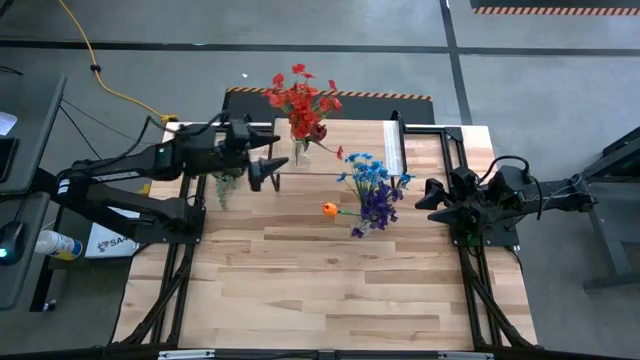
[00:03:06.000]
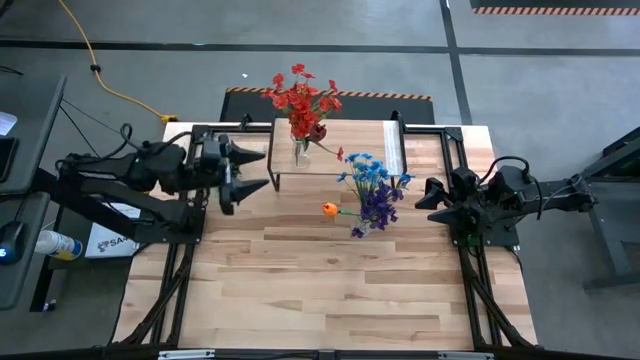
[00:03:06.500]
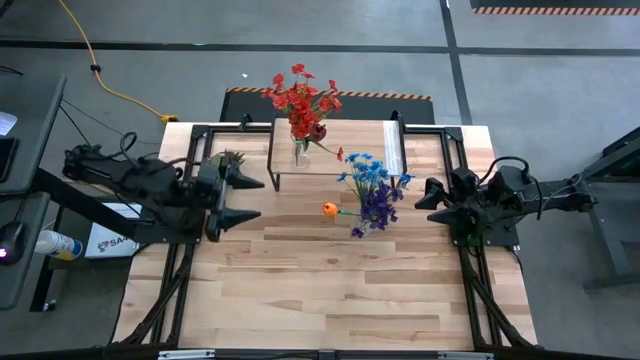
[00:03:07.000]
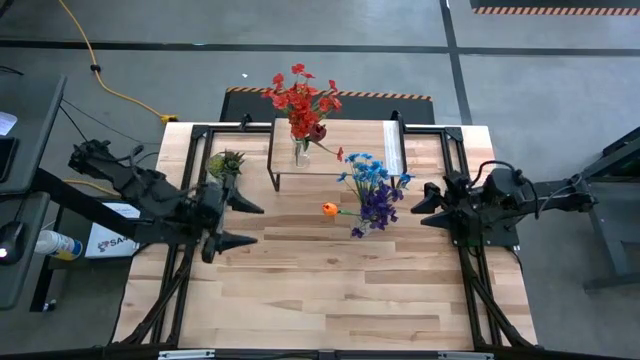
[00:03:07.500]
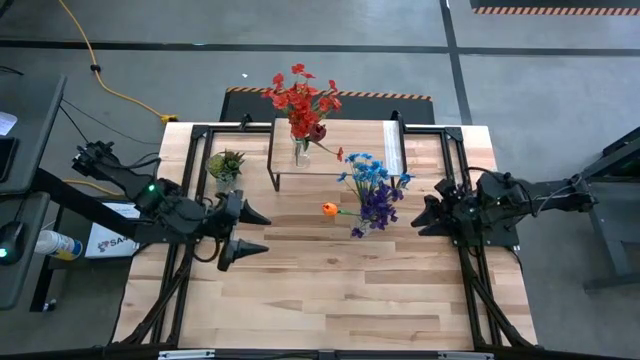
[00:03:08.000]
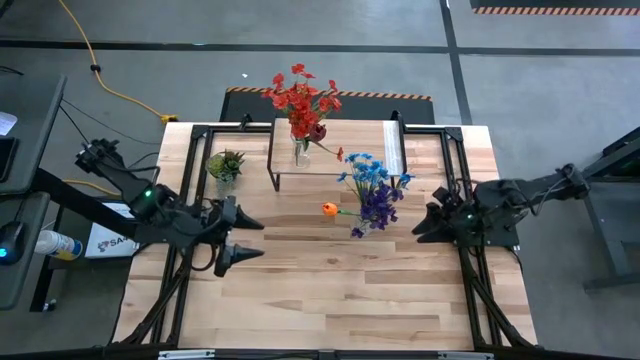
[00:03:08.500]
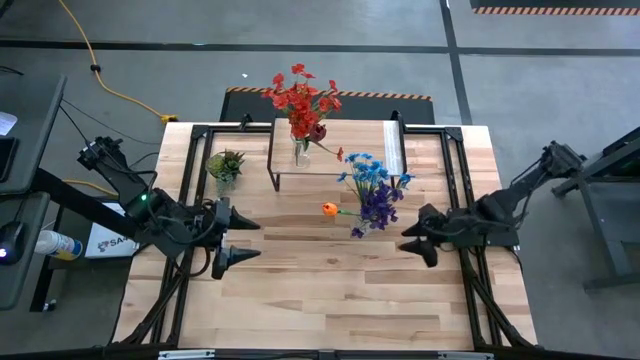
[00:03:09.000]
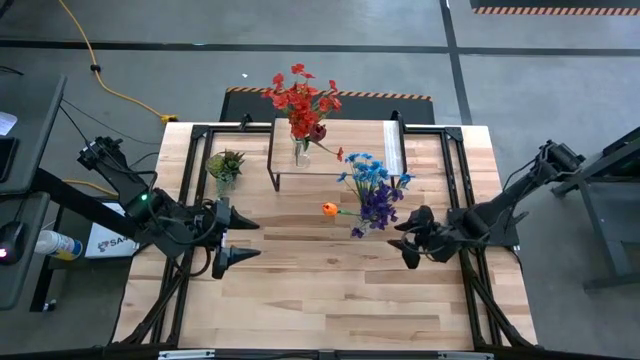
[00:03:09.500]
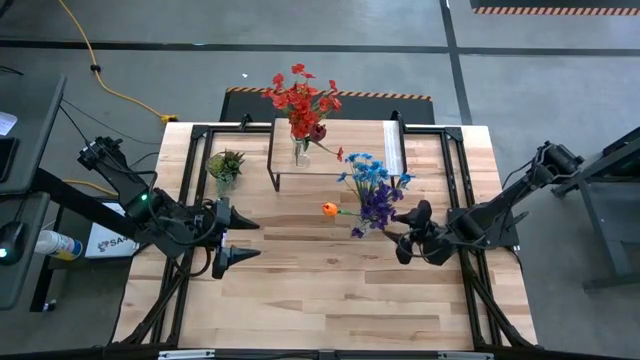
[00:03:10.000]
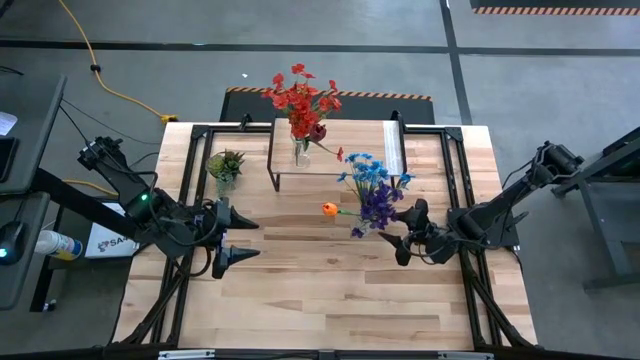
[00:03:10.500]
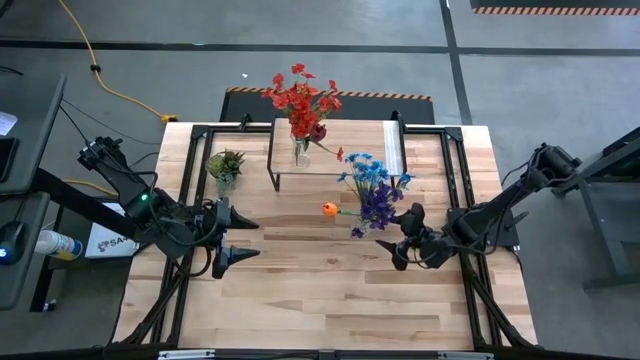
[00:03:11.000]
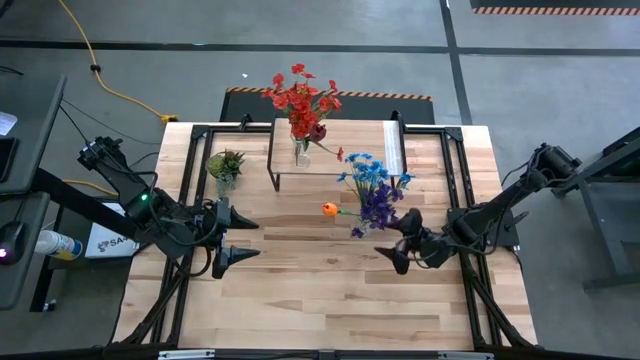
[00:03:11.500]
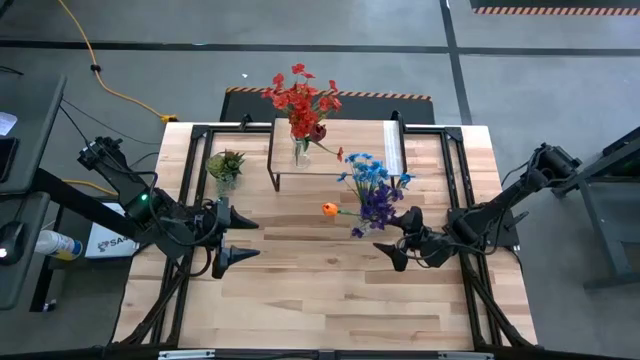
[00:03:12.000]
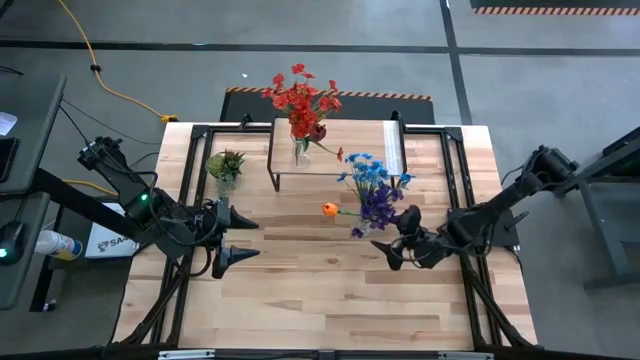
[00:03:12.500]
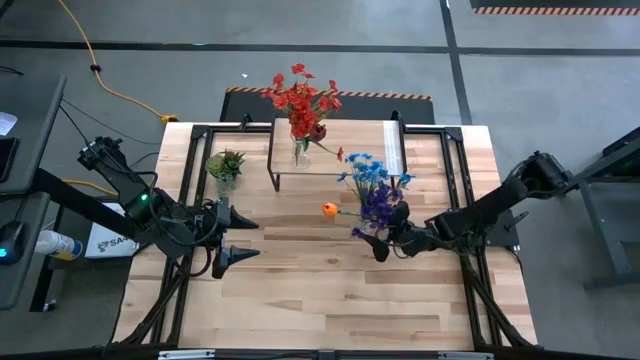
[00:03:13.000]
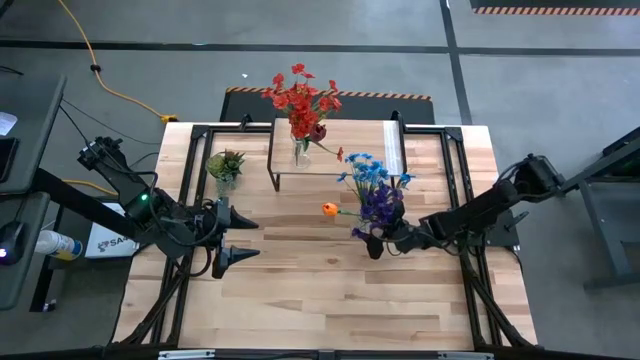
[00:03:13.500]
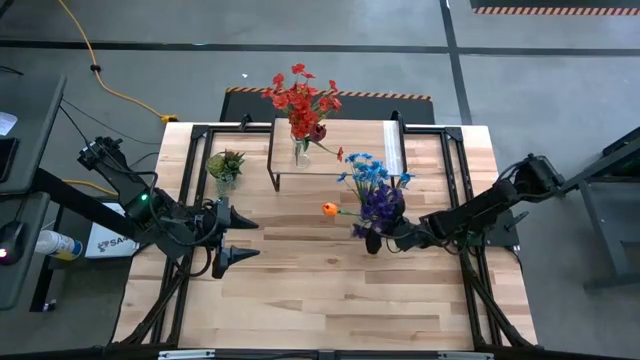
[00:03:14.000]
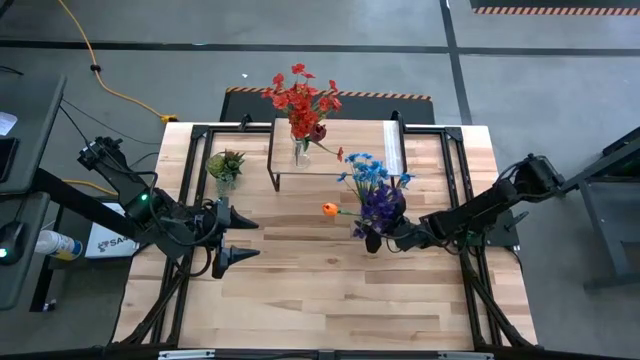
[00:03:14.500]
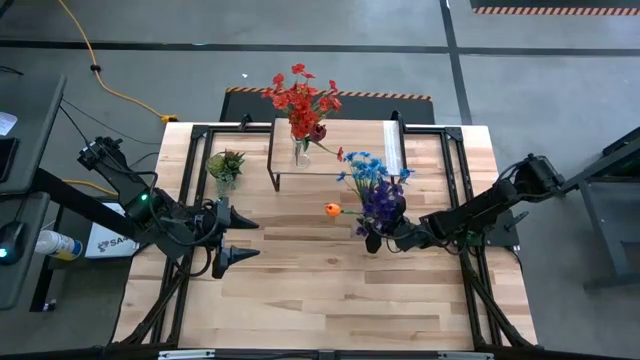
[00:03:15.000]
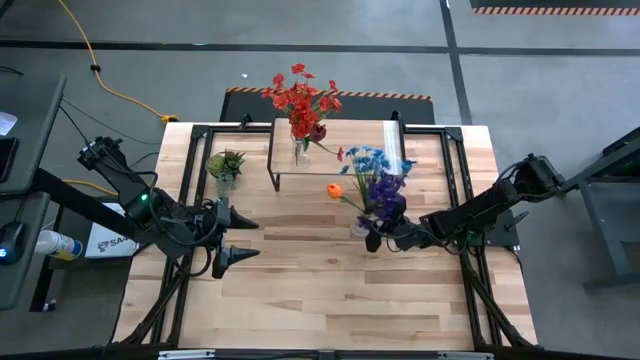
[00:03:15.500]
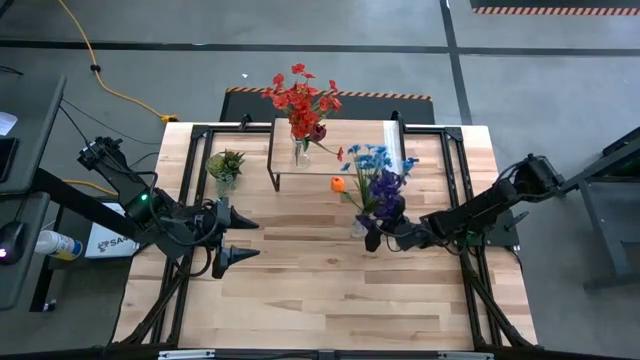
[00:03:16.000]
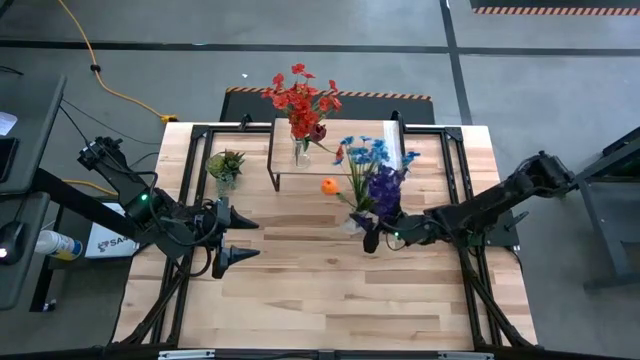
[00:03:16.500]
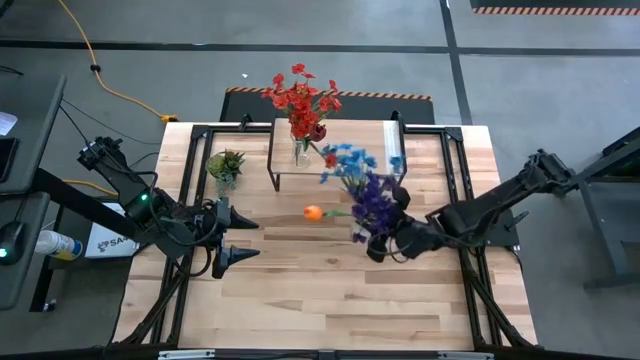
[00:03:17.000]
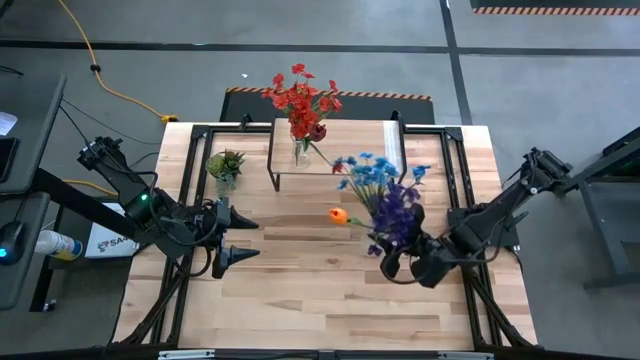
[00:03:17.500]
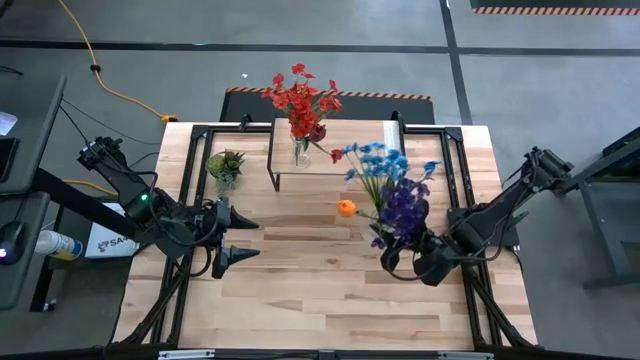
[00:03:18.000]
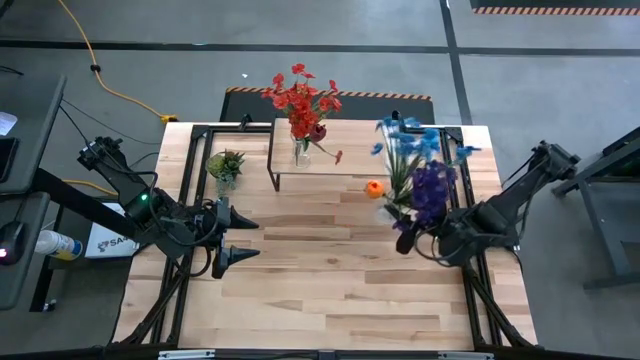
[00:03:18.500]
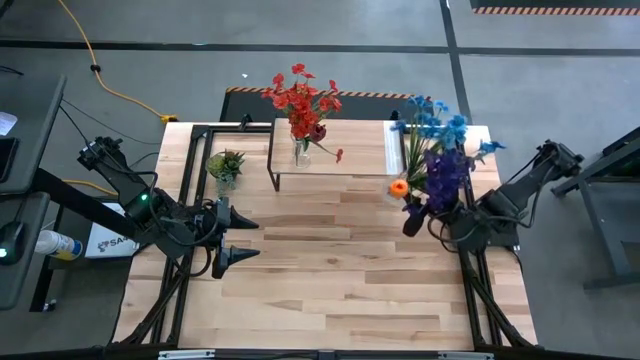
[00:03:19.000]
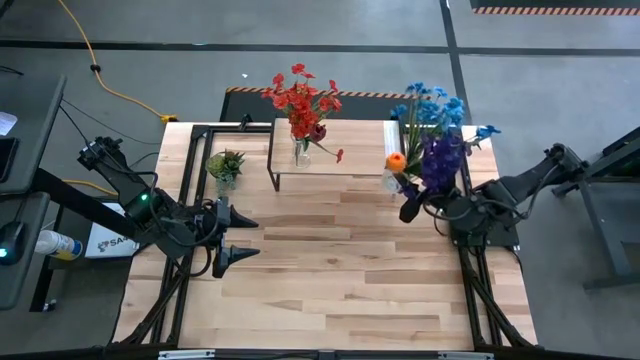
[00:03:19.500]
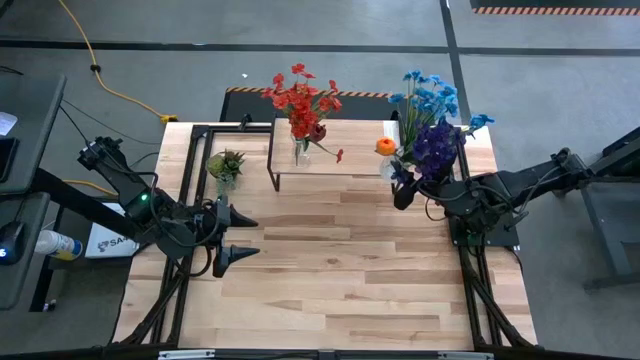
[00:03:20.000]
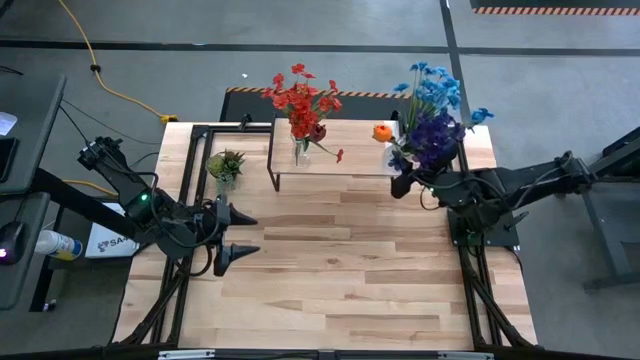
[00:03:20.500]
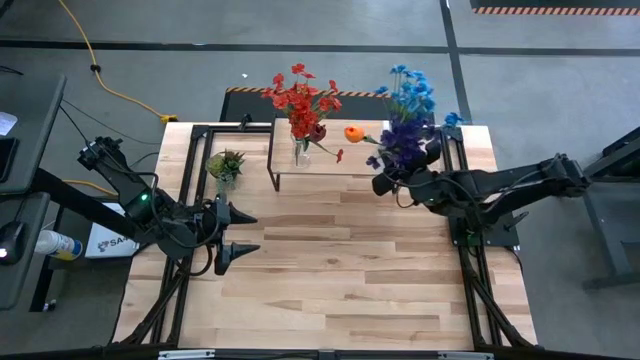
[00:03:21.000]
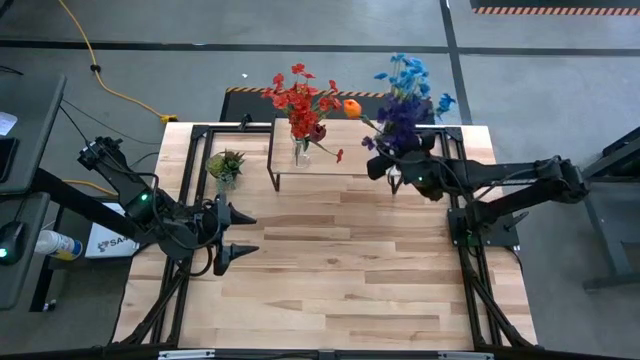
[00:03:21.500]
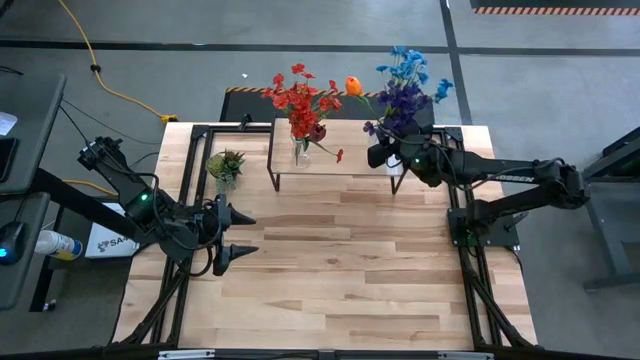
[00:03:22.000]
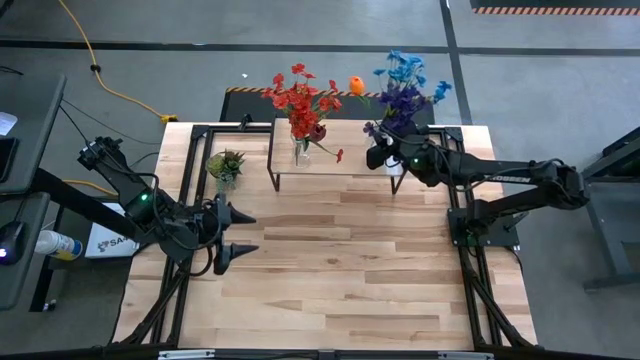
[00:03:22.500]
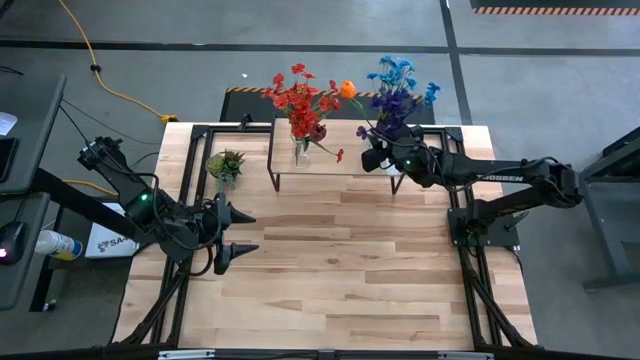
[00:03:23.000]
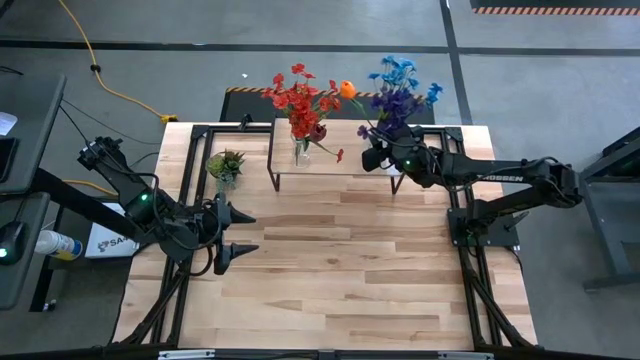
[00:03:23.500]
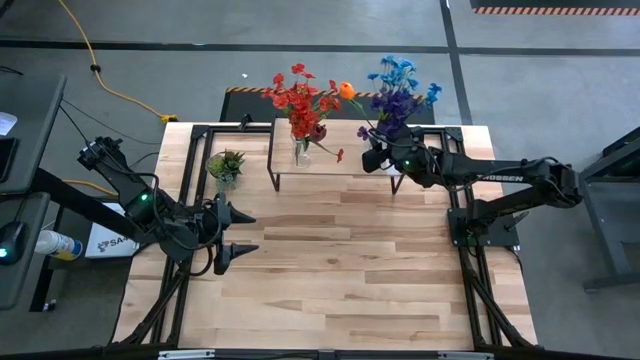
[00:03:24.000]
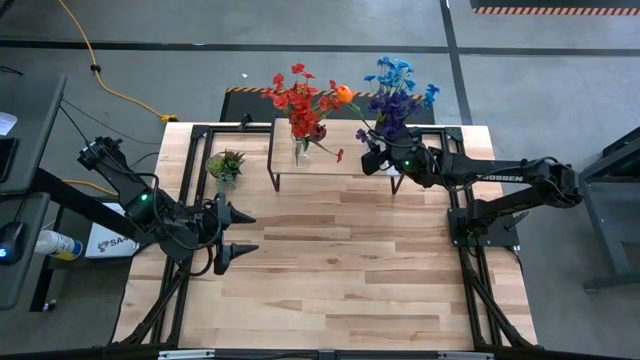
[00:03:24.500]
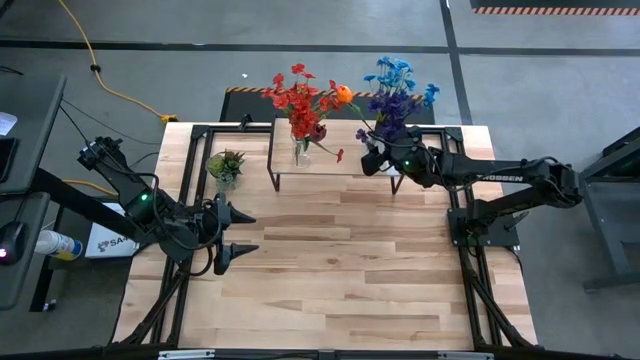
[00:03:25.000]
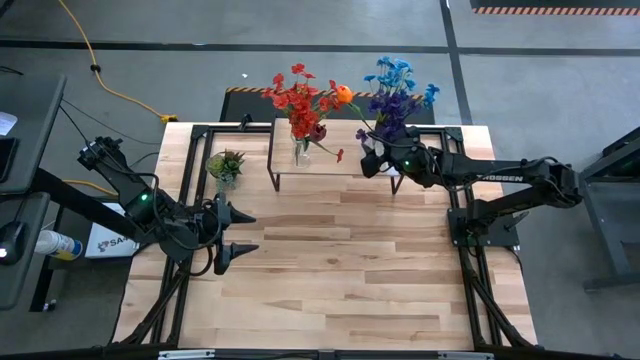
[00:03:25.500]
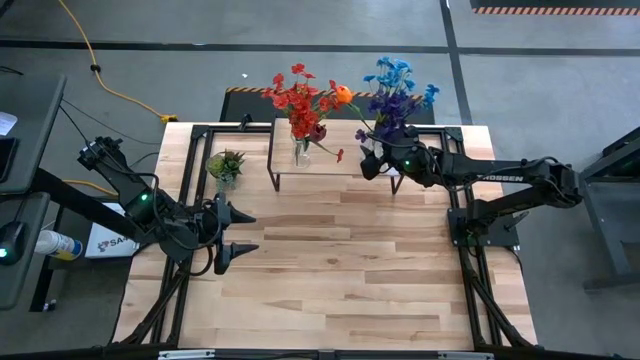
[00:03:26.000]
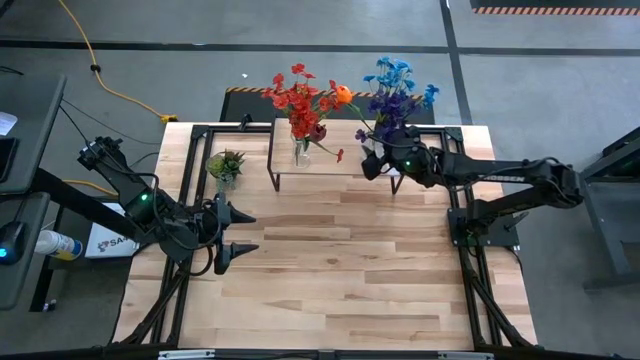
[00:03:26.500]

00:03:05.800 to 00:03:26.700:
Task: Pick and place flowers into a vace then onto a shelf
Put the transparent vase with flowers on the shelf
